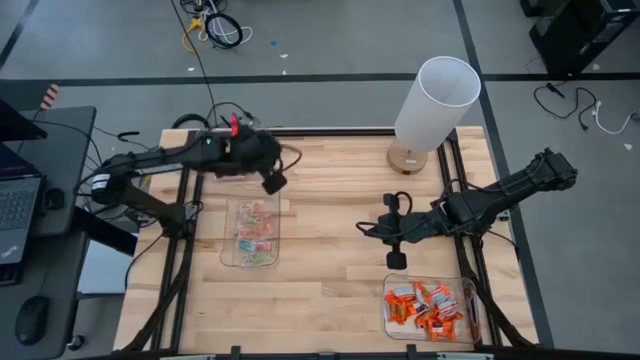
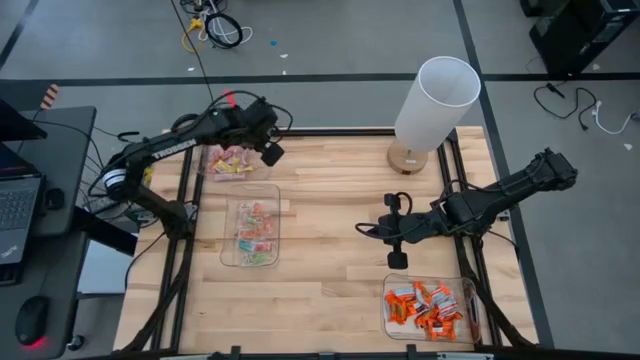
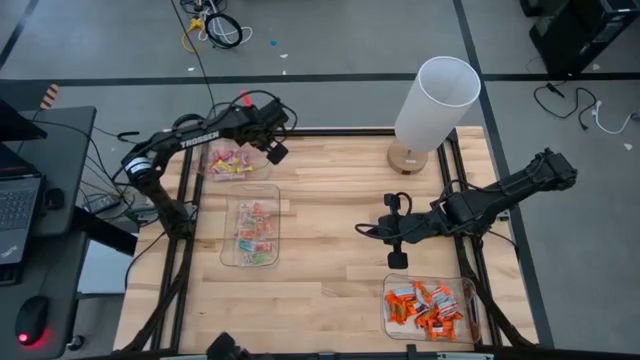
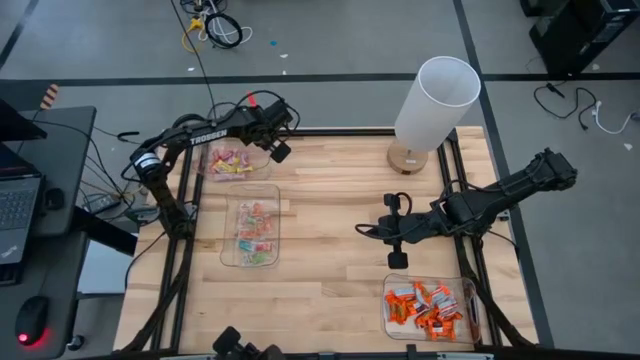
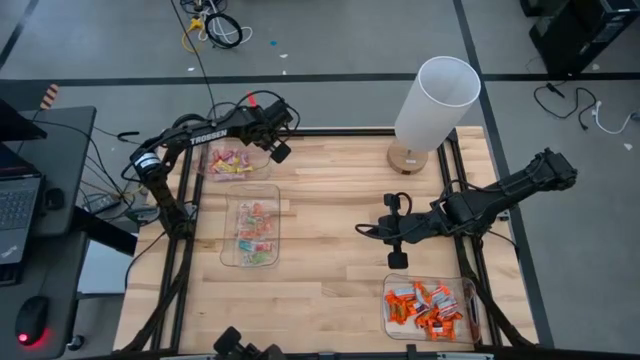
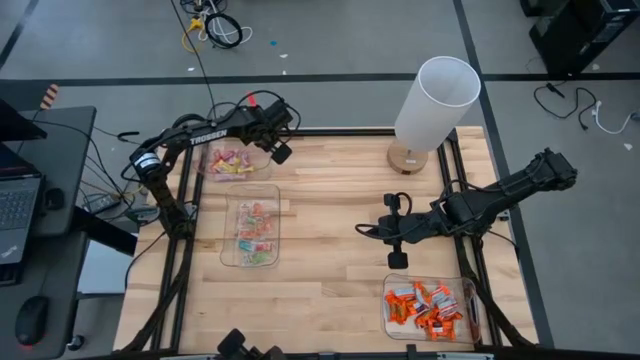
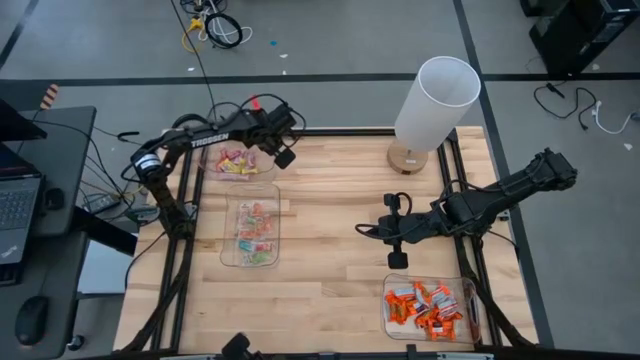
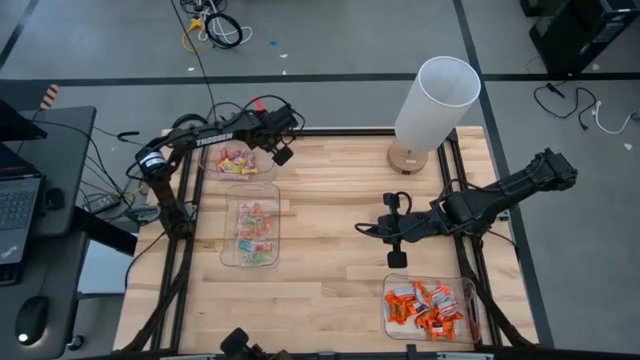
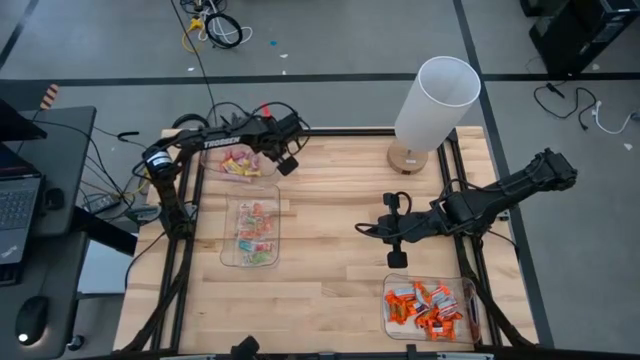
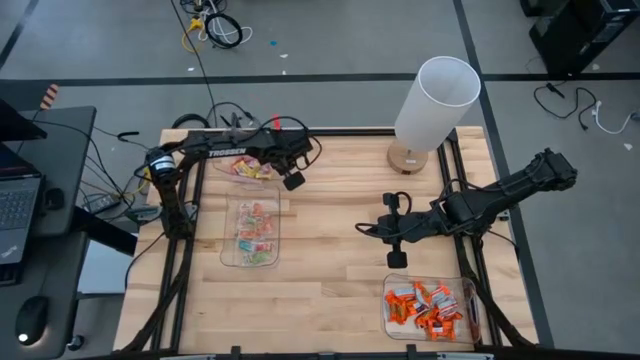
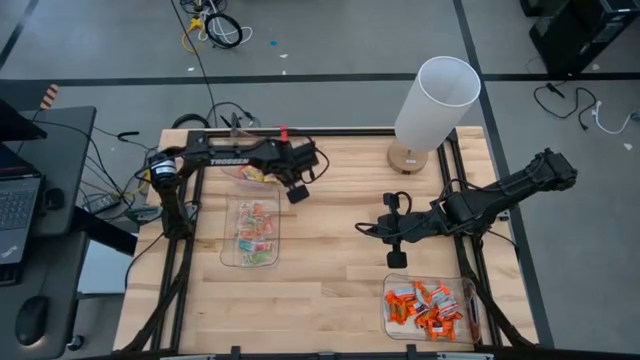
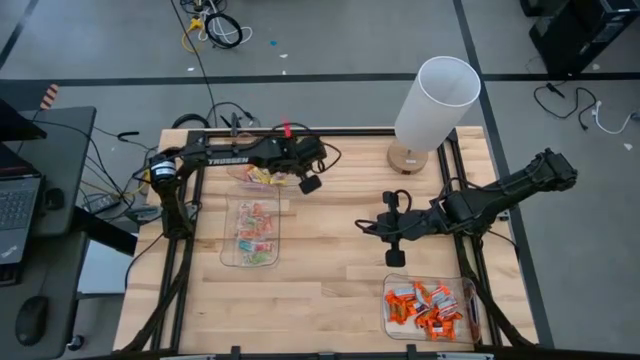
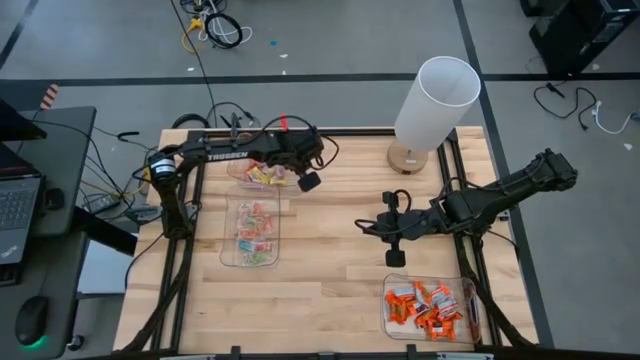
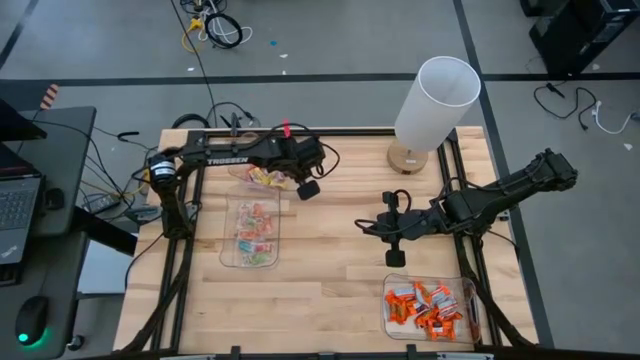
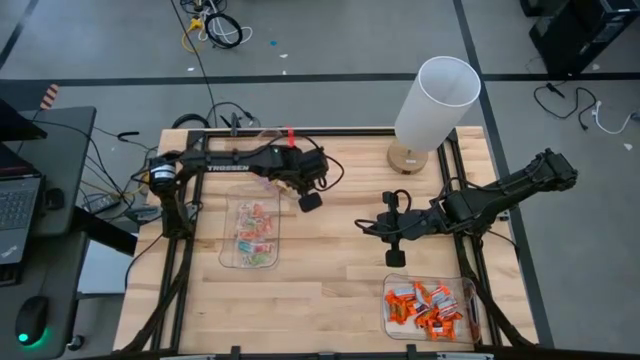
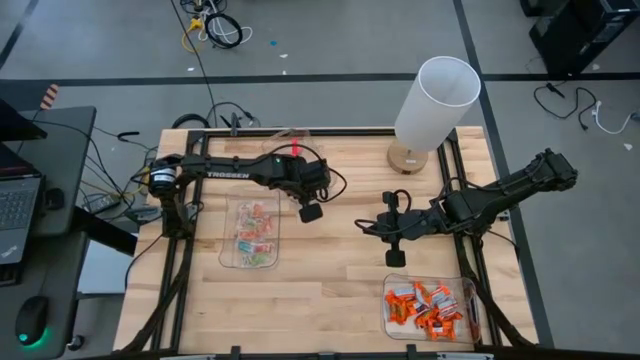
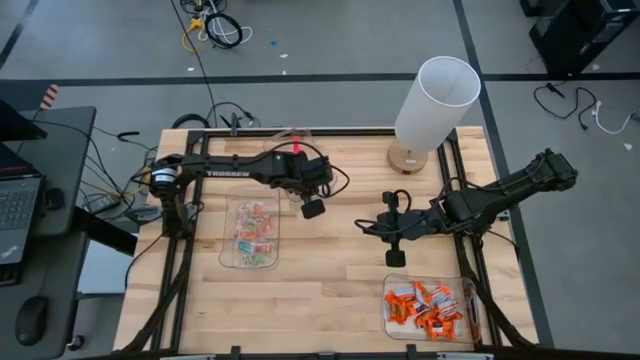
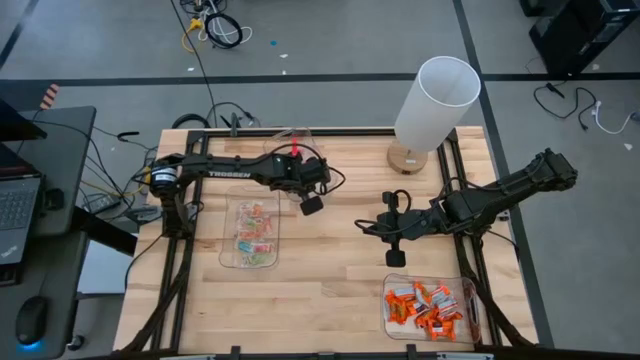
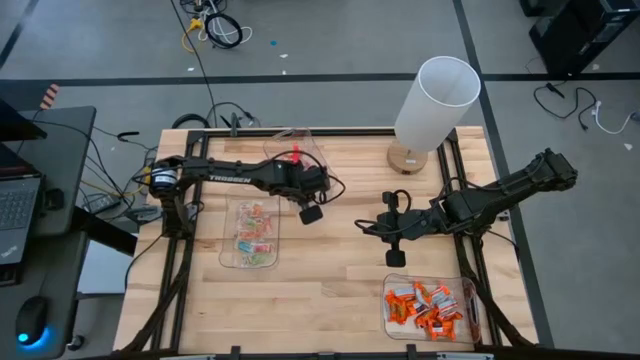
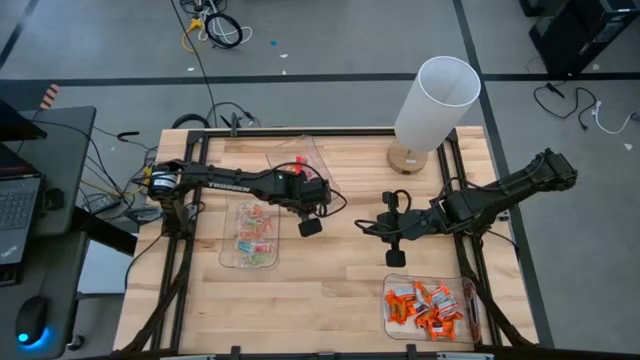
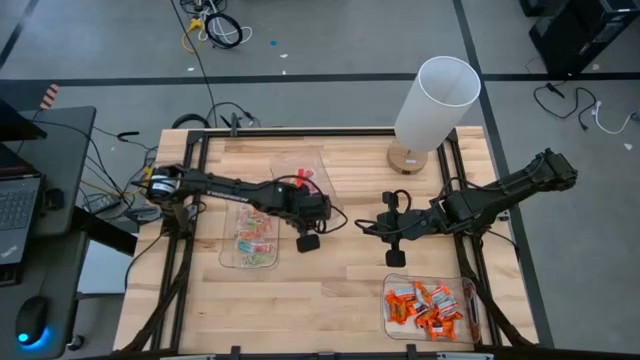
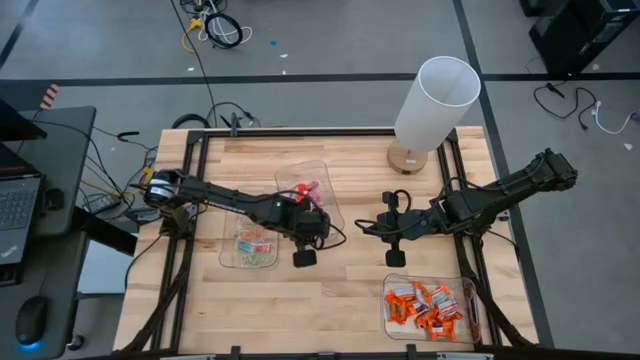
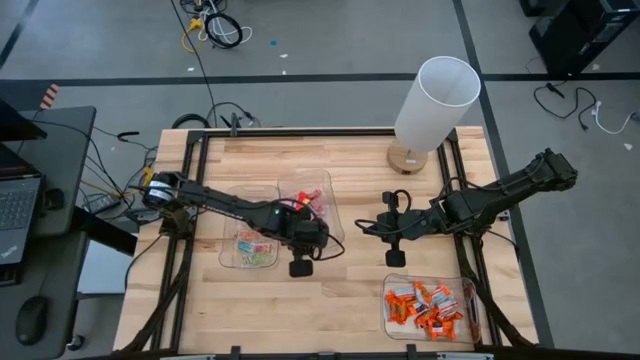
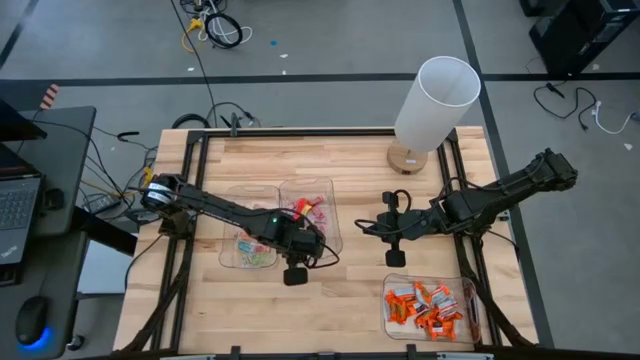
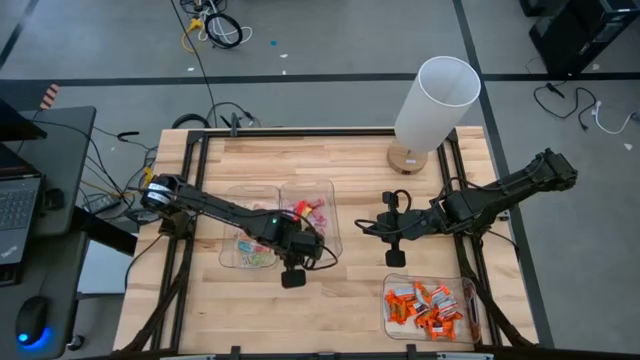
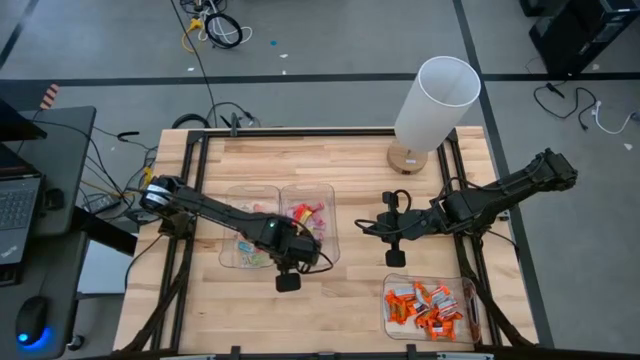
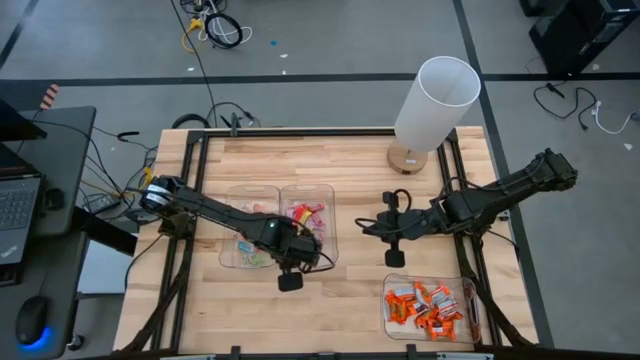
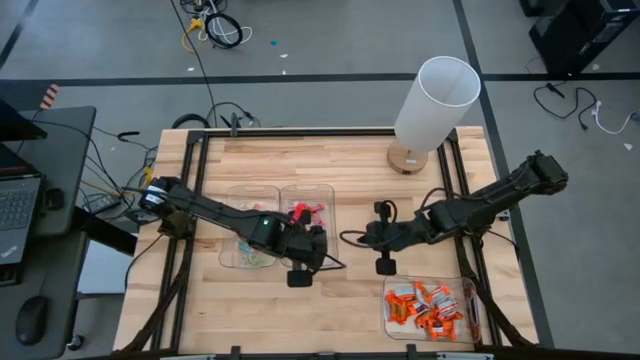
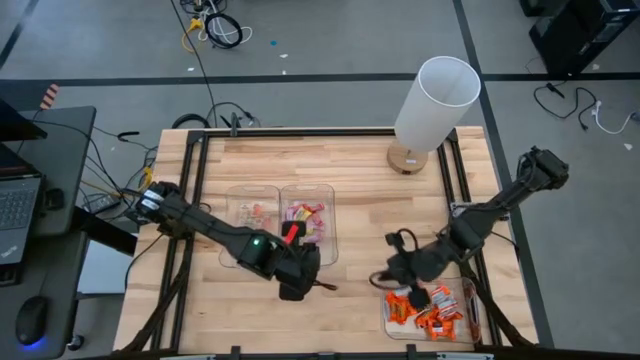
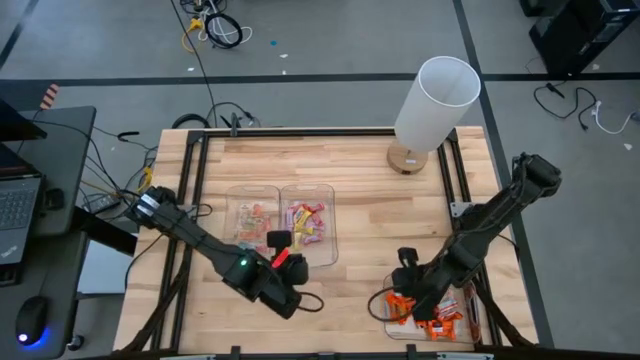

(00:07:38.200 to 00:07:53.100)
Task: Sort candy
Move the top left transparent bin to the center of the table

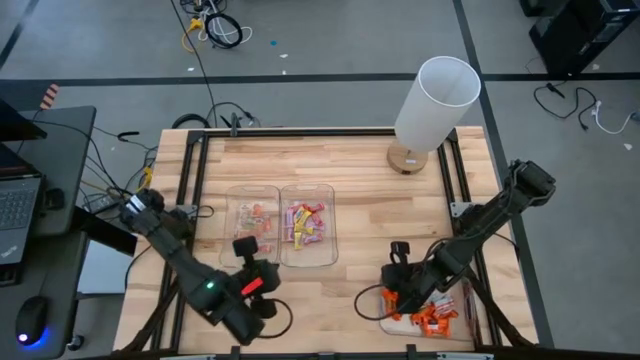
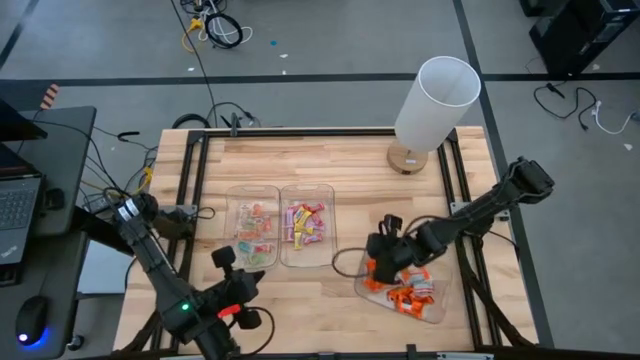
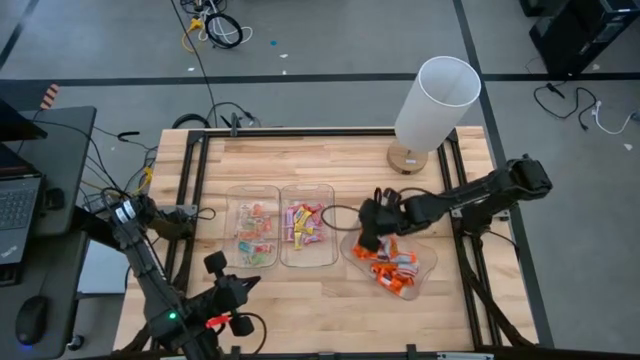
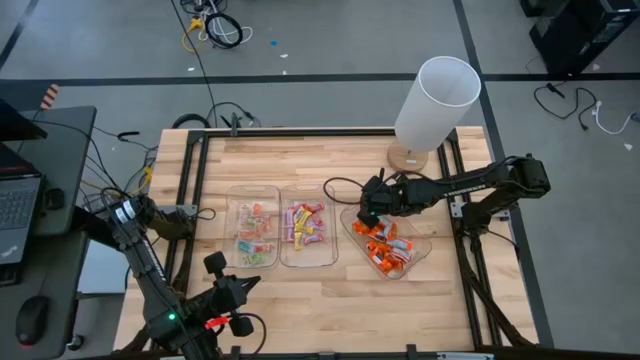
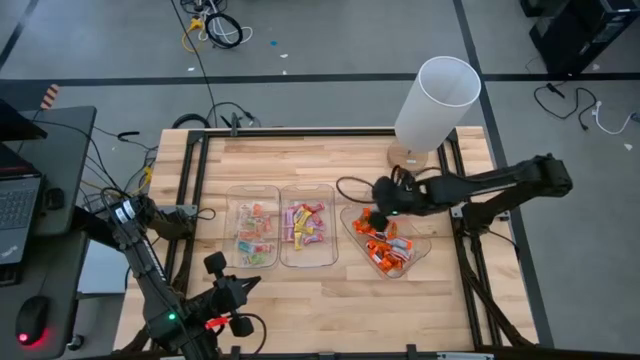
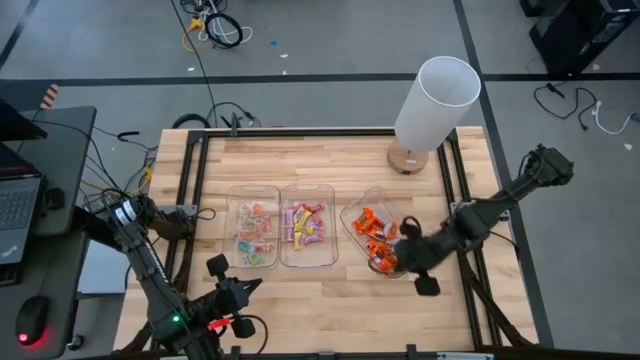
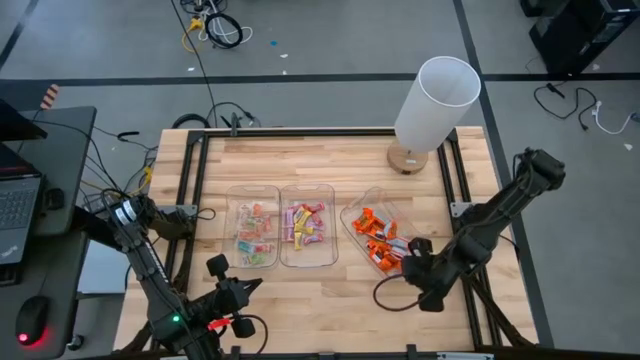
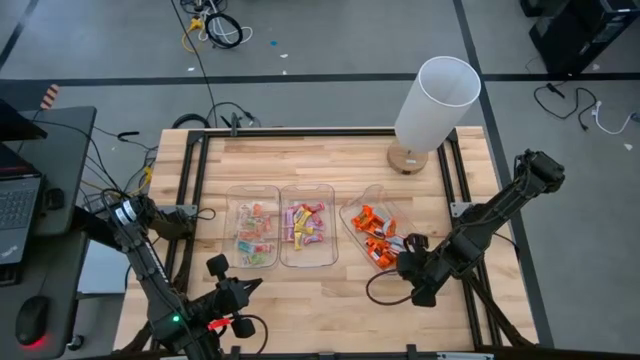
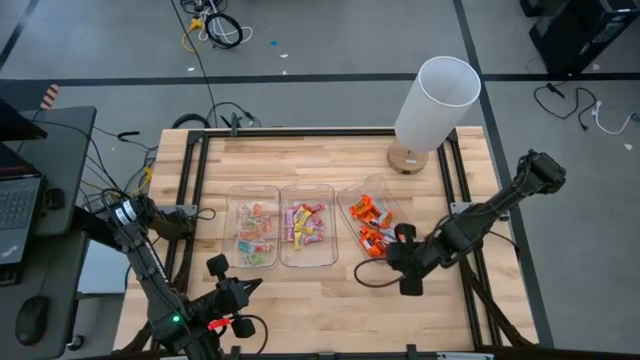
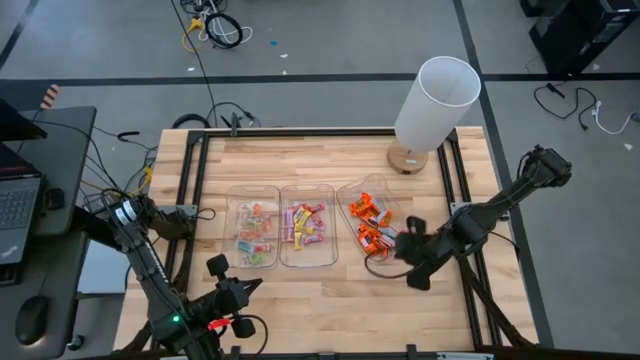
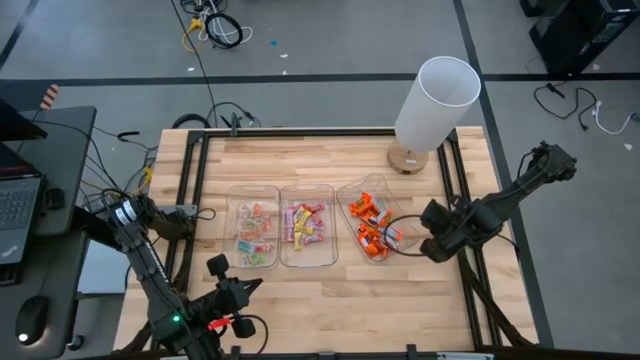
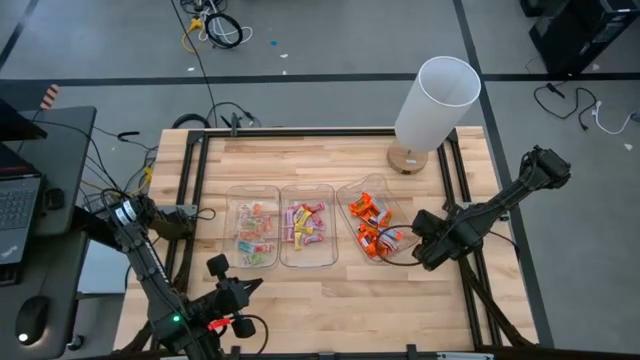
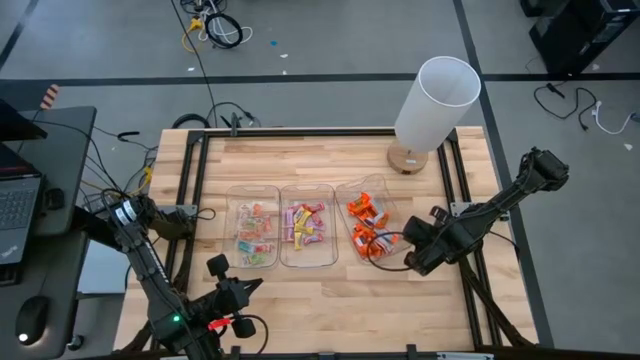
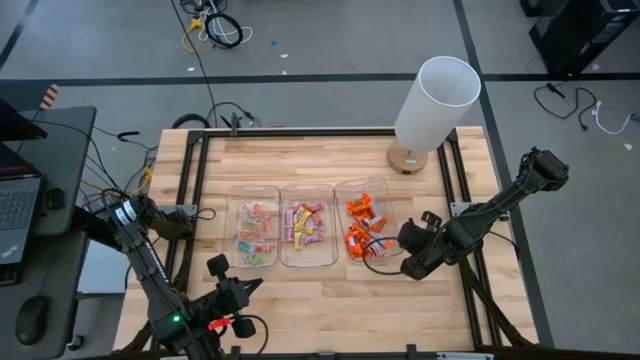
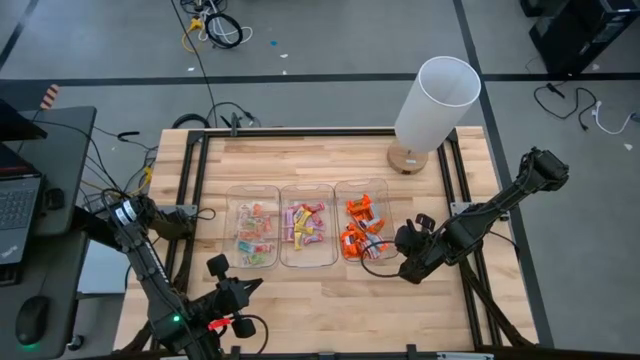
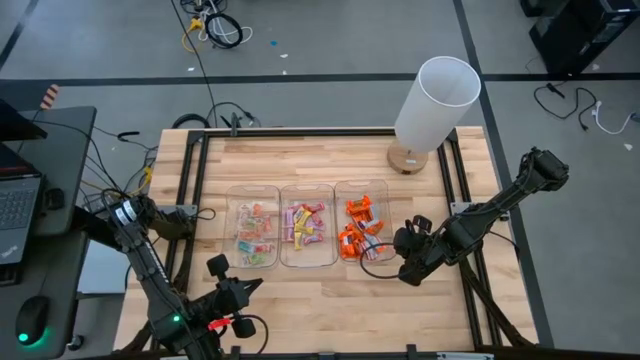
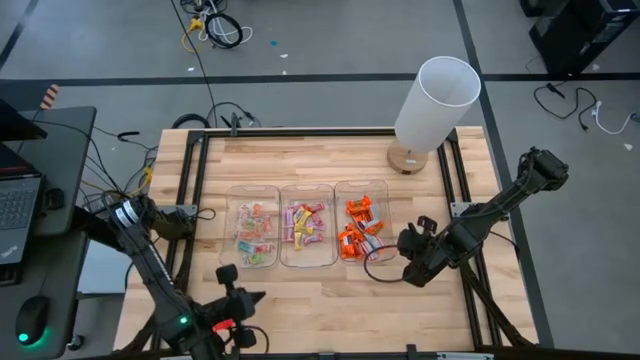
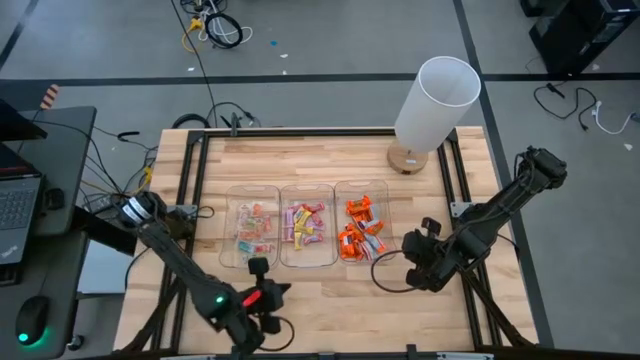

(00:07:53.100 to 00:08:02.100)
Move bottom right transparent bin to the middle right of the table
